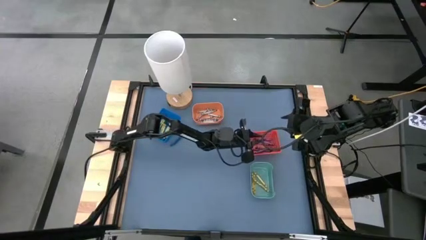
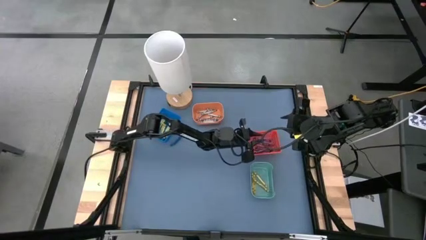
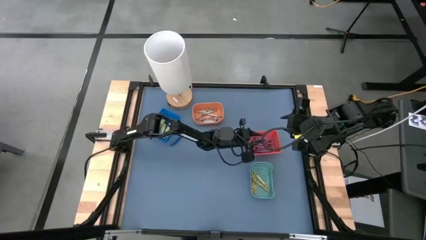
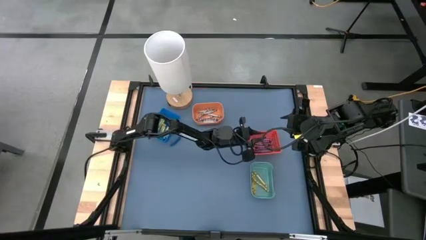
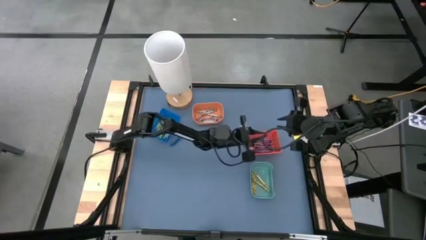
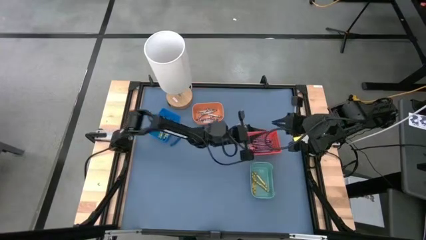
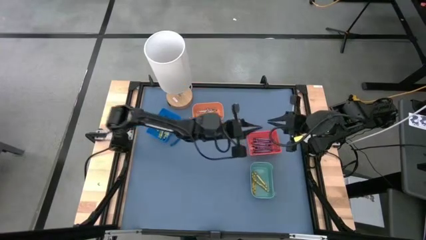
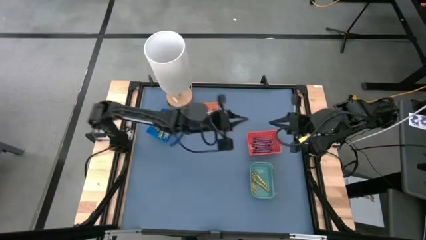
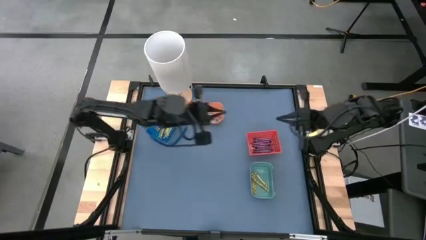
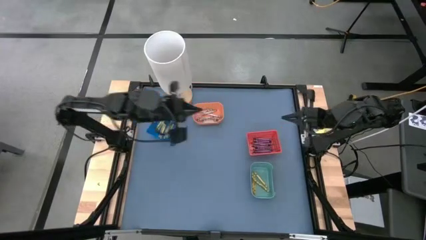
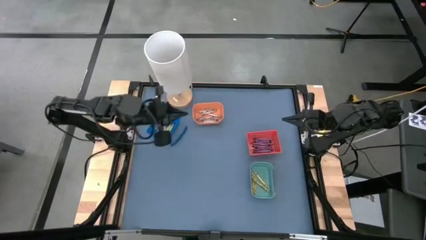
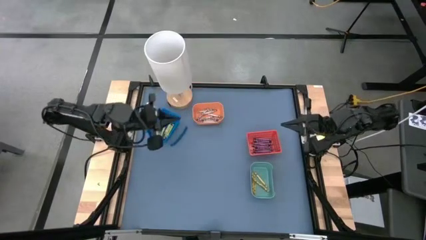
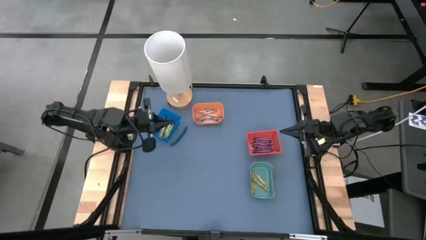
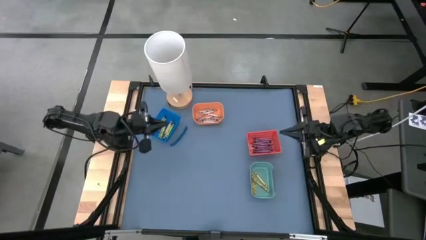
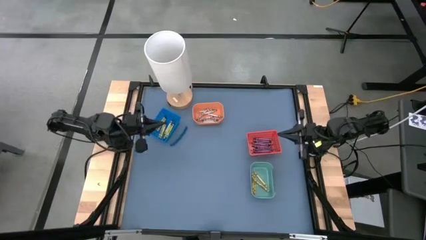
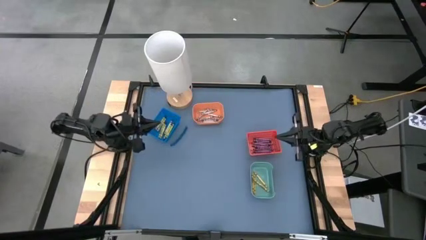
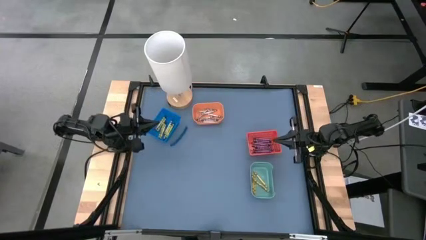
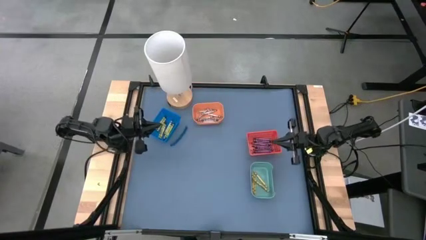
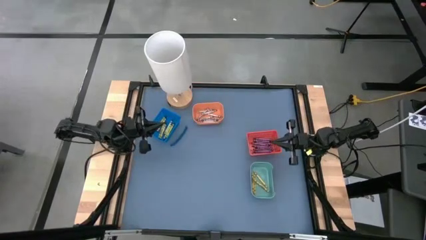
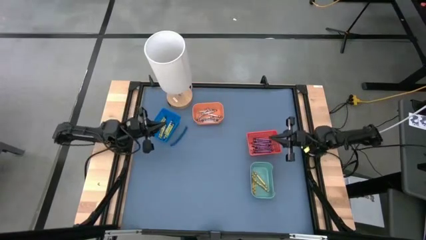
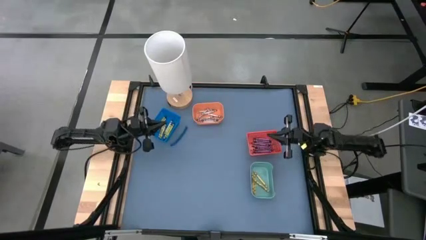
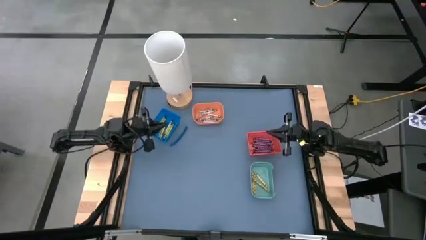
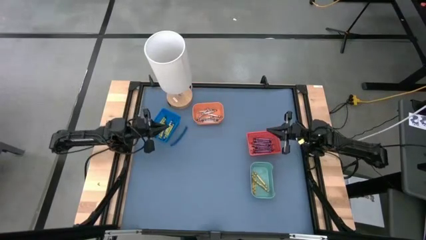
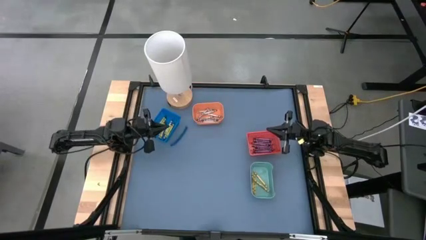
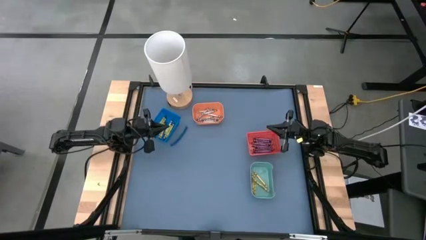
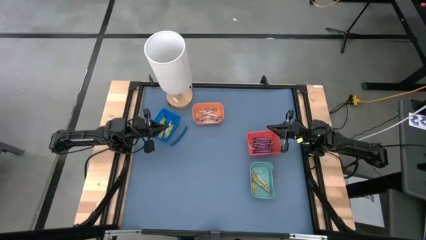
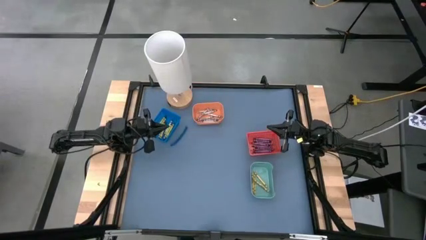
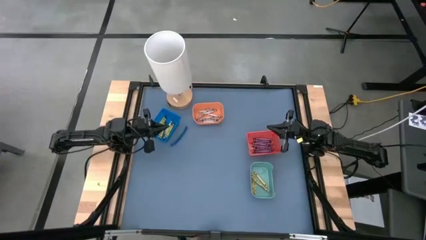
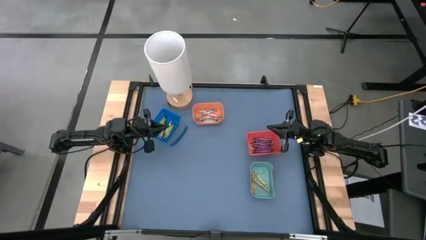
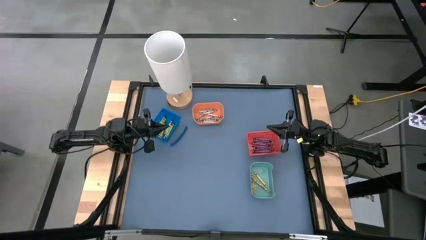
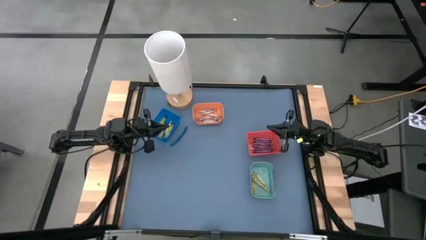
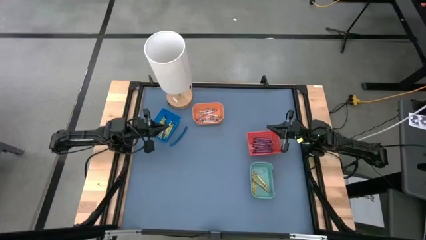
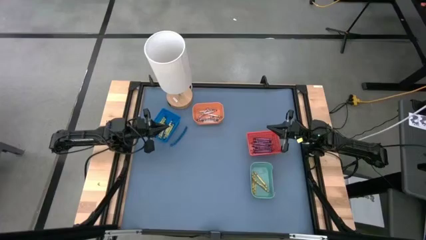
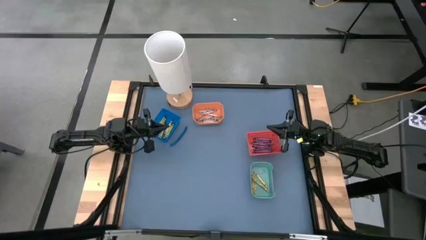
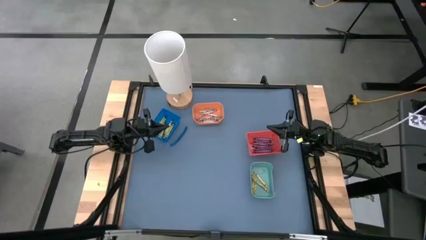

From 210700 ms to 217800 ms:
Task: Sort crayons
Return to Home Position

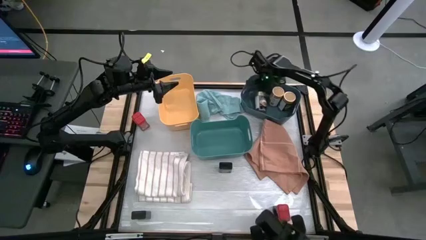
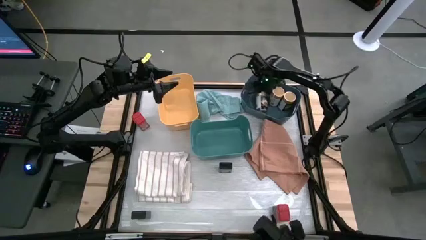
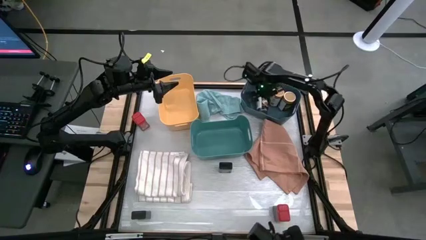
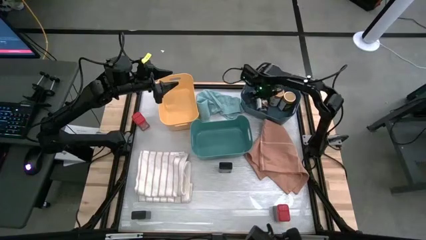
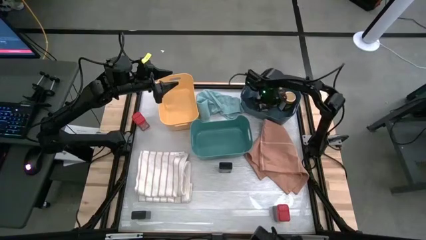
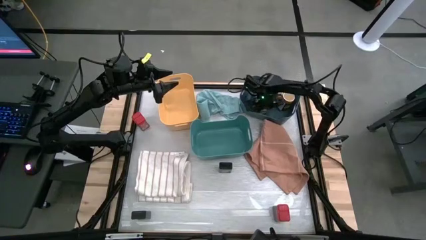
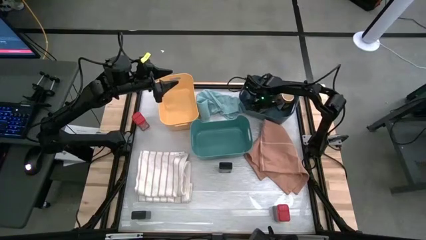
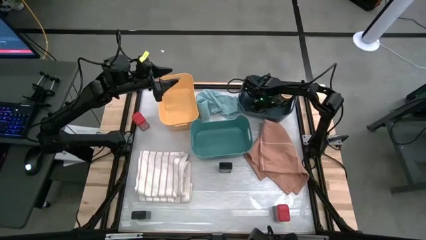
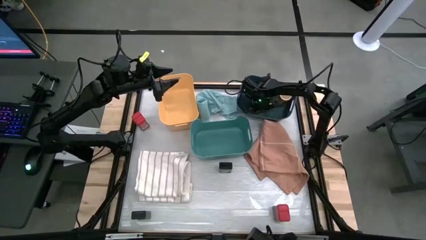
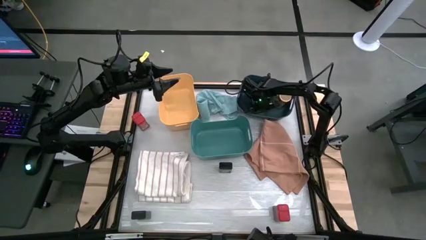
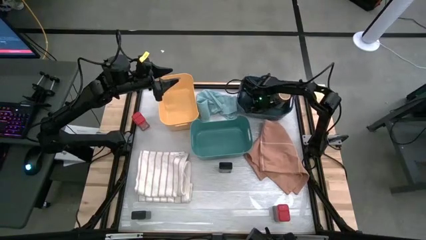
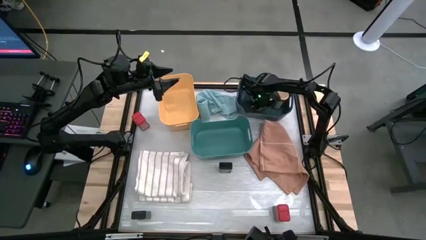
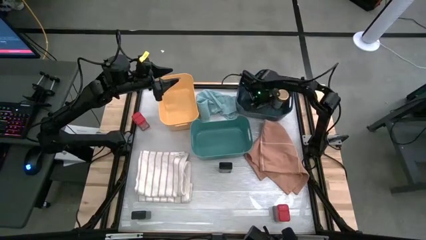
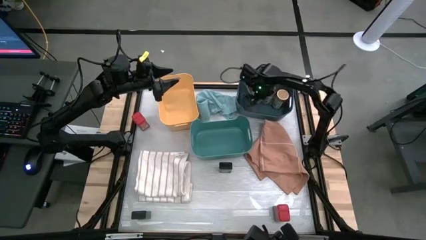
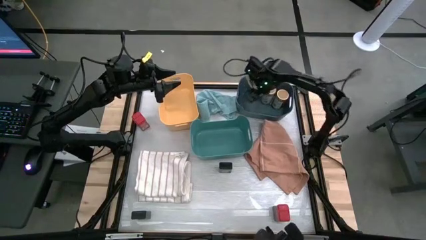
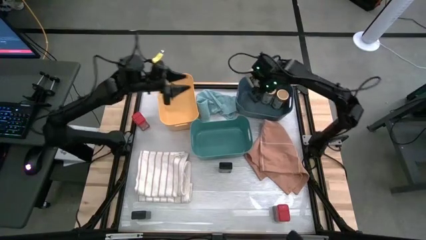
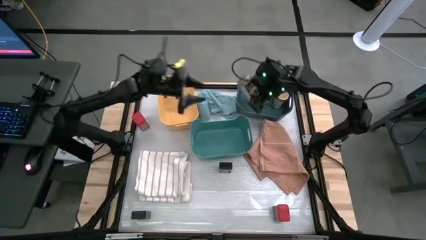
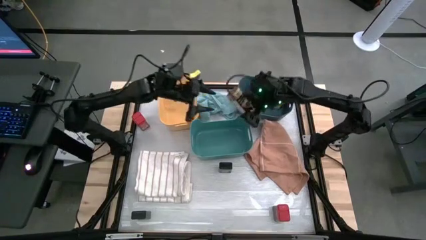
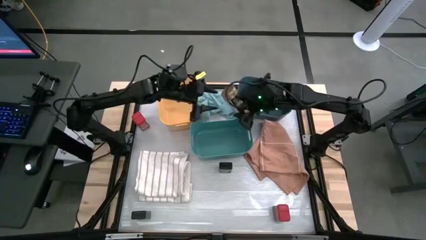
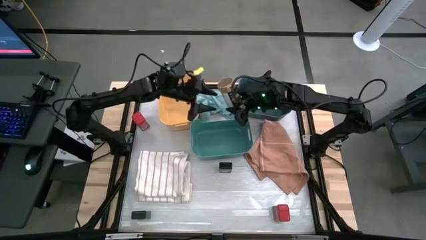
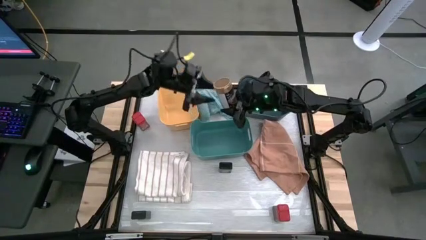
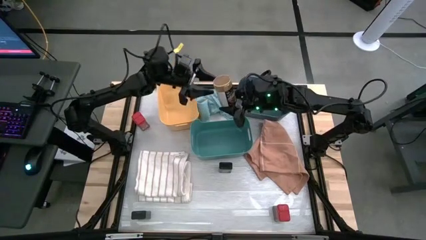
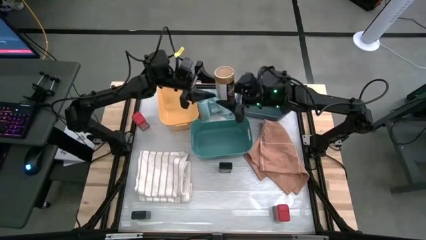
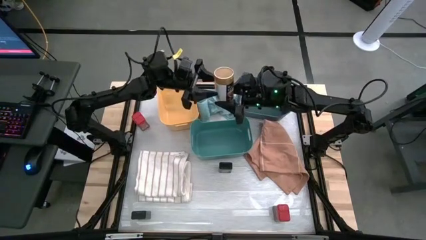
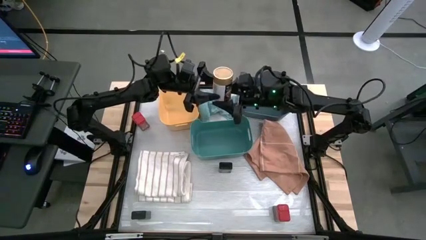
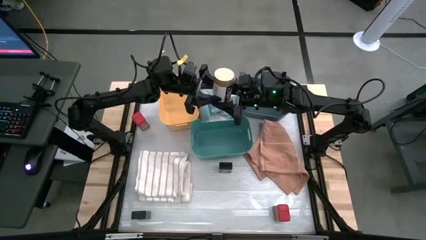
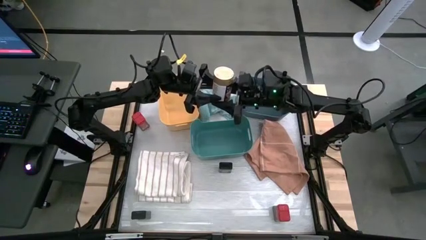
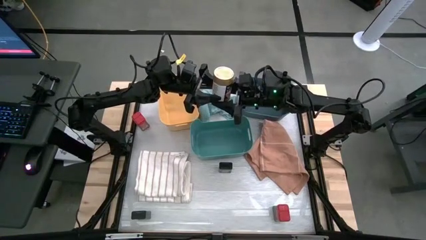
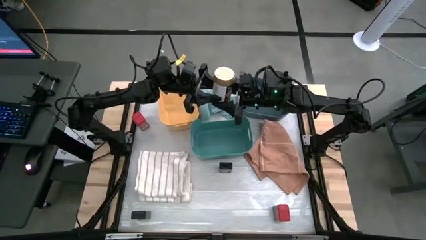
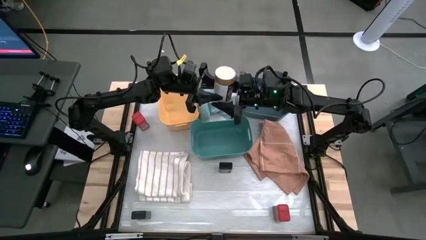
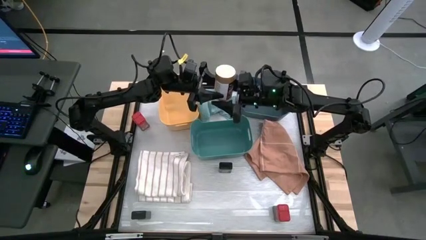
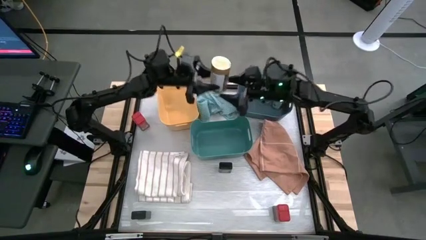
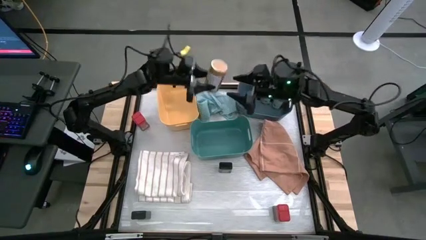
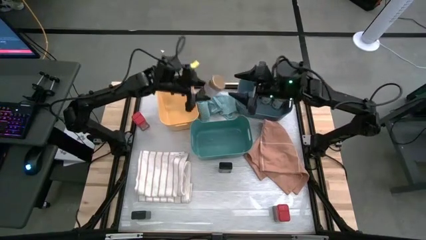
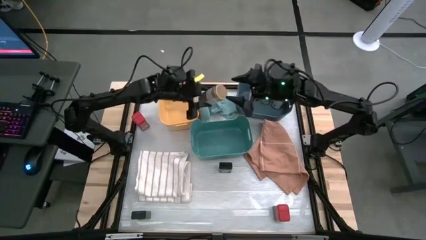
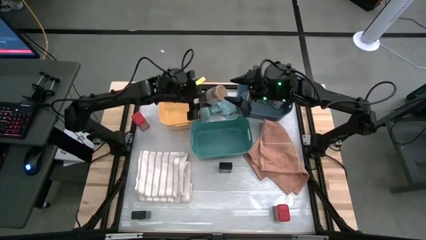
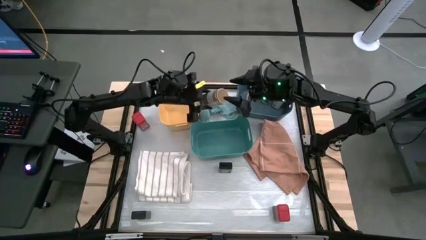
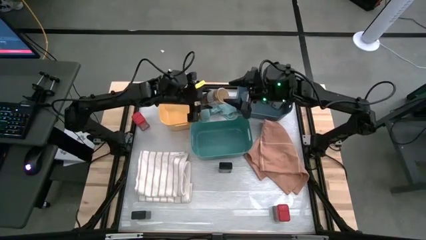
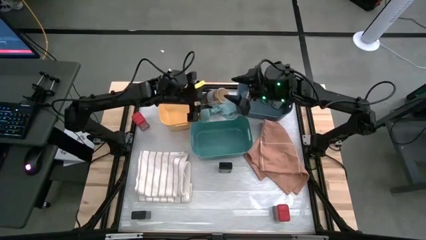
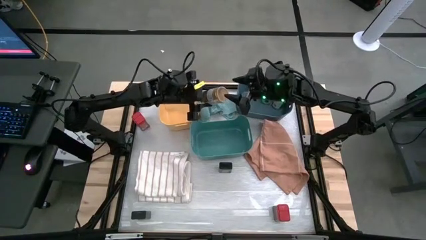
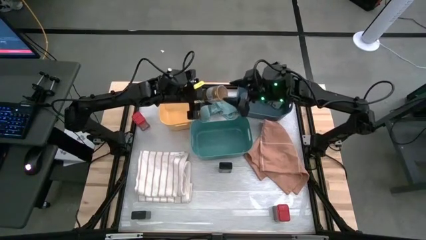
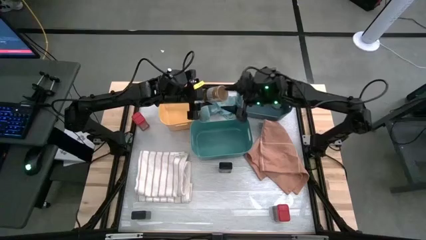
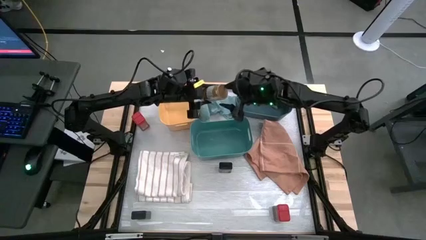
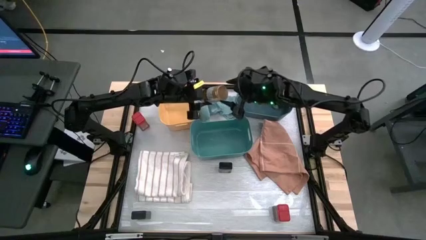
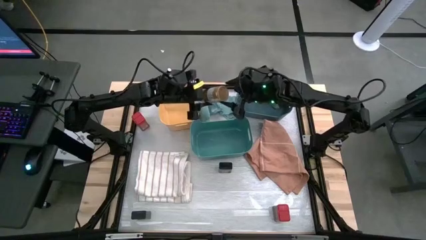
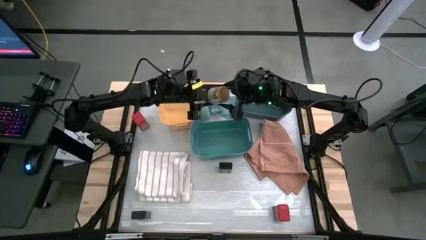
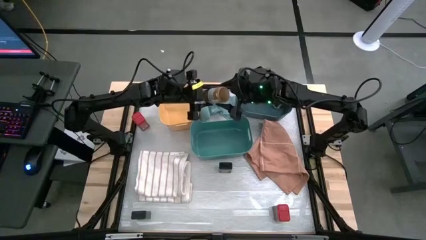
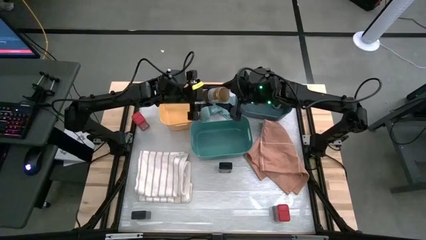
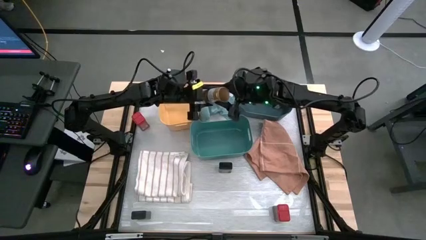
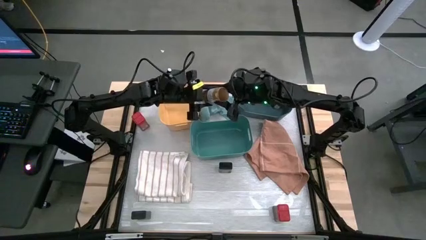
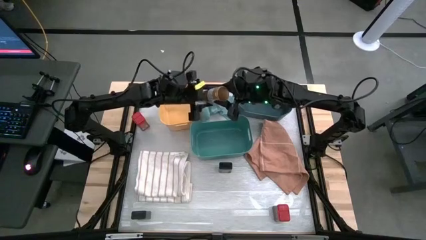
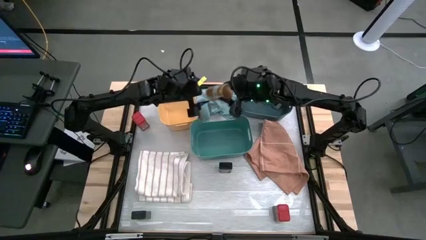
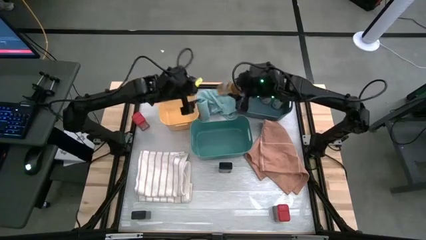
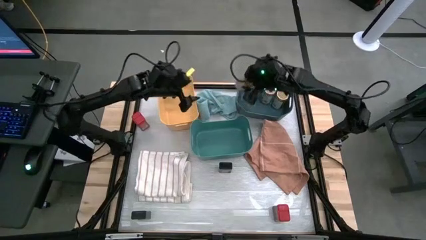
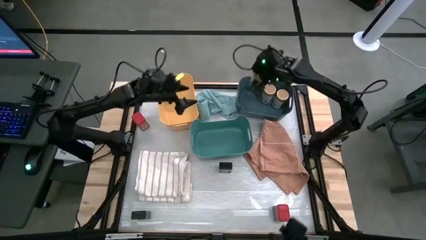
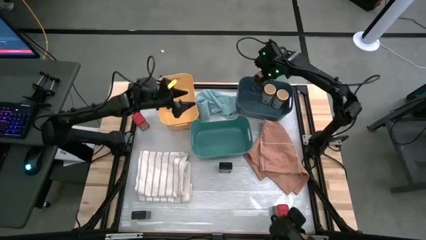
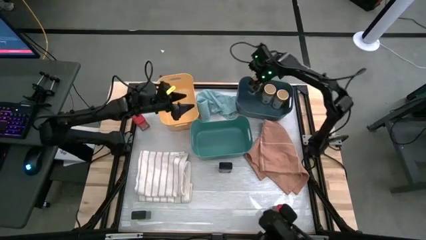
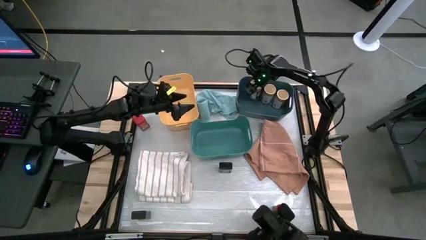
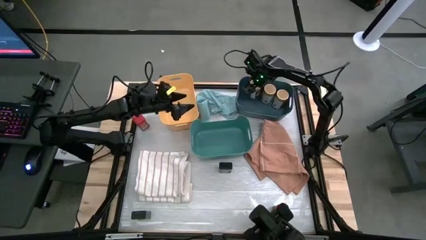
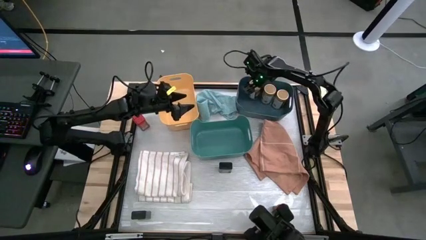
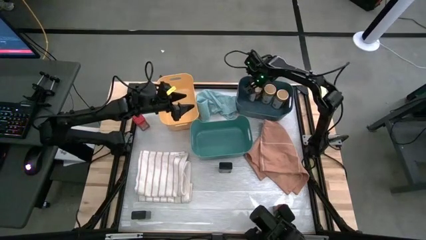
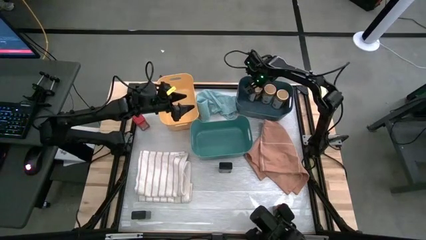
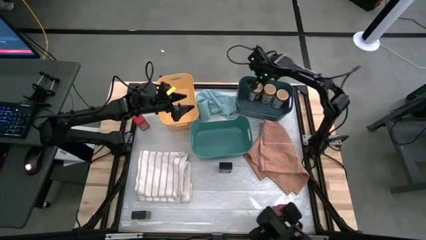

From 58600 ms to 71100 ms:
Task: Sort spices by type
Put the gold seasoning bottle into the blue bin
